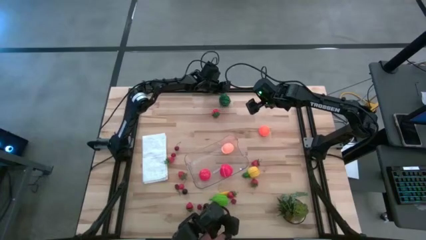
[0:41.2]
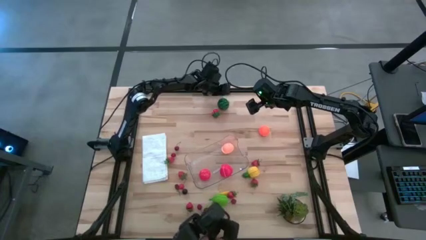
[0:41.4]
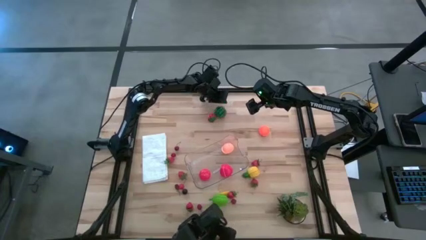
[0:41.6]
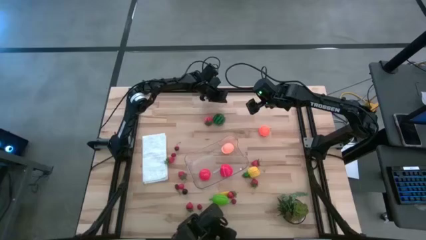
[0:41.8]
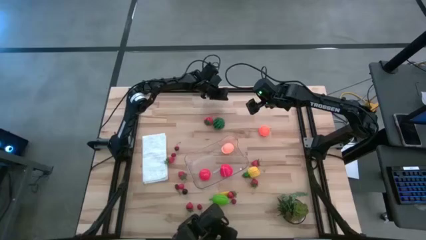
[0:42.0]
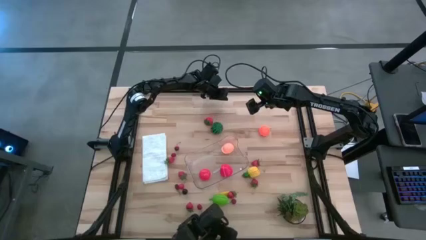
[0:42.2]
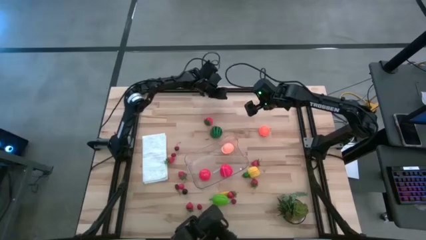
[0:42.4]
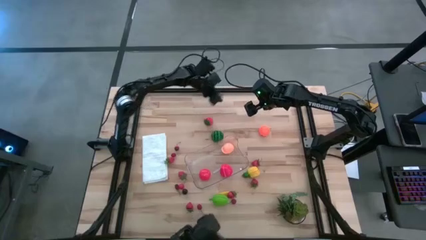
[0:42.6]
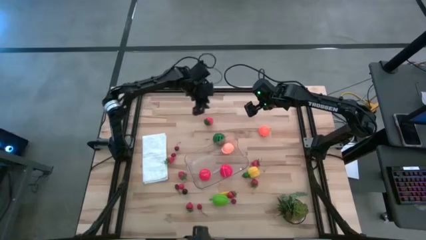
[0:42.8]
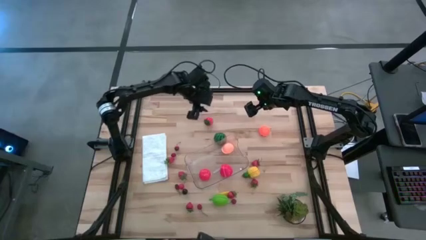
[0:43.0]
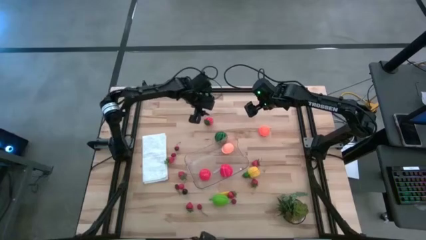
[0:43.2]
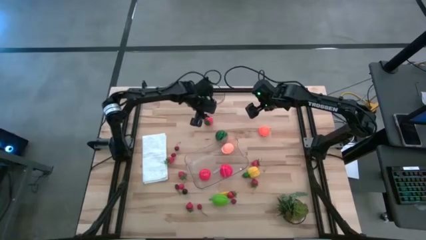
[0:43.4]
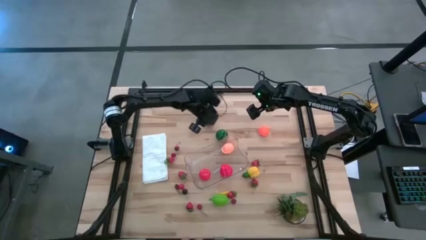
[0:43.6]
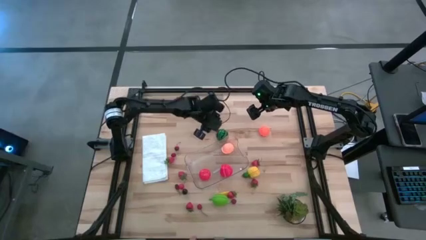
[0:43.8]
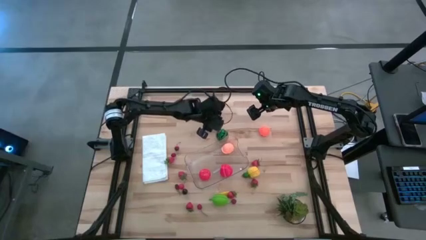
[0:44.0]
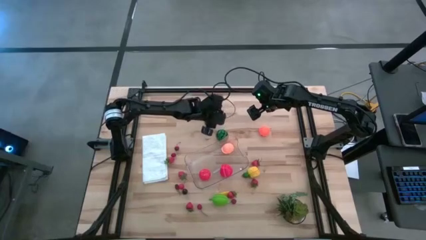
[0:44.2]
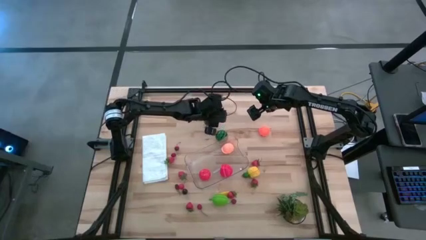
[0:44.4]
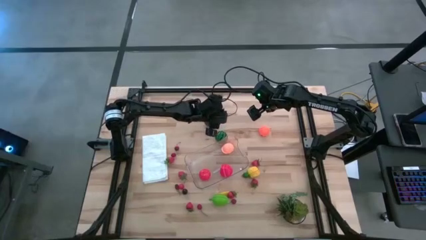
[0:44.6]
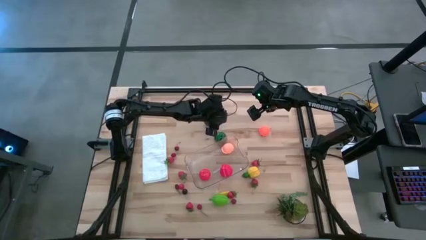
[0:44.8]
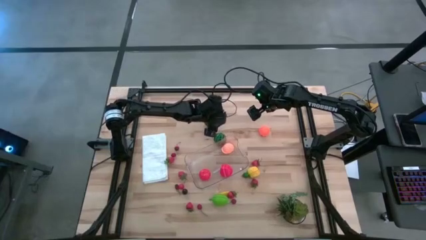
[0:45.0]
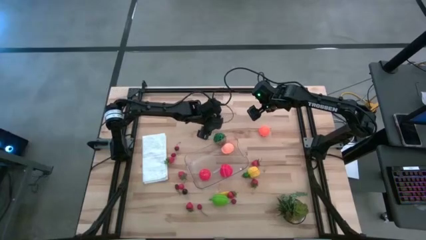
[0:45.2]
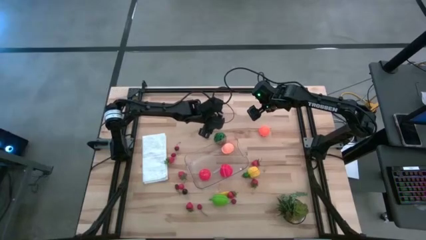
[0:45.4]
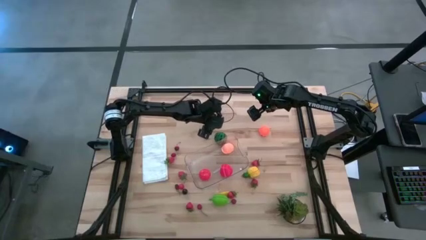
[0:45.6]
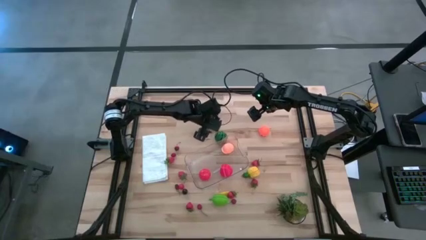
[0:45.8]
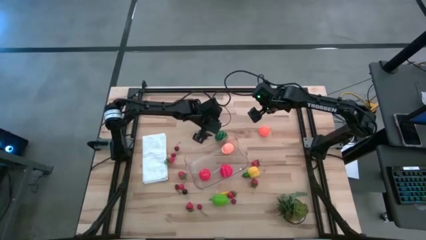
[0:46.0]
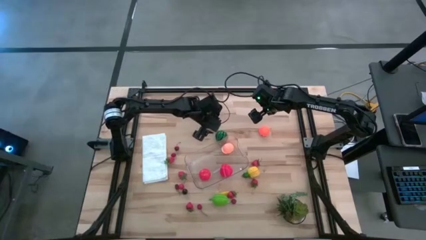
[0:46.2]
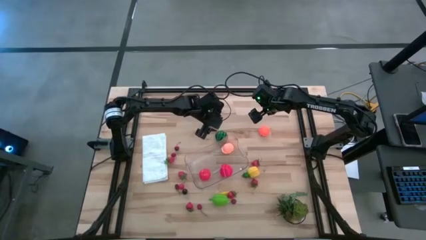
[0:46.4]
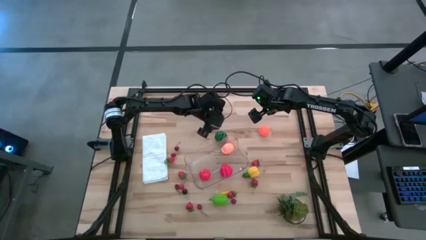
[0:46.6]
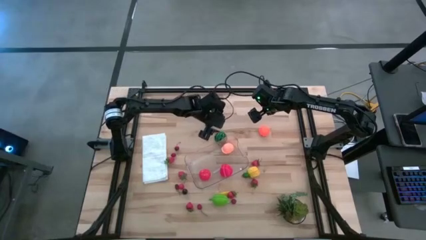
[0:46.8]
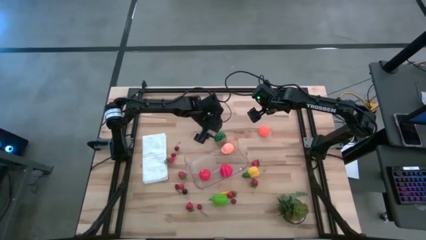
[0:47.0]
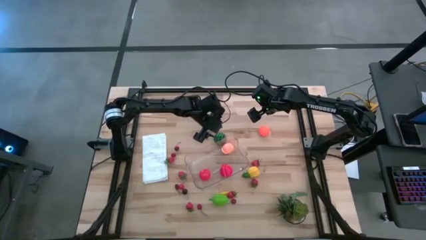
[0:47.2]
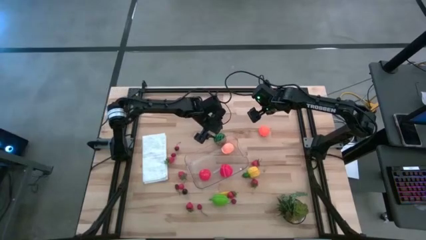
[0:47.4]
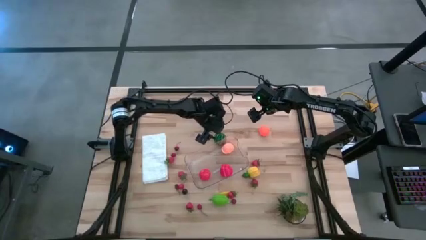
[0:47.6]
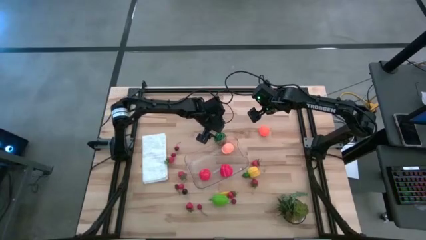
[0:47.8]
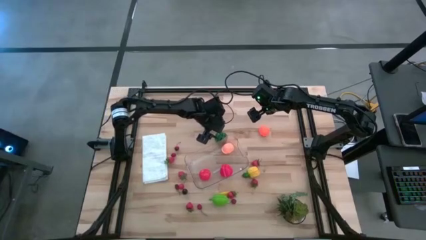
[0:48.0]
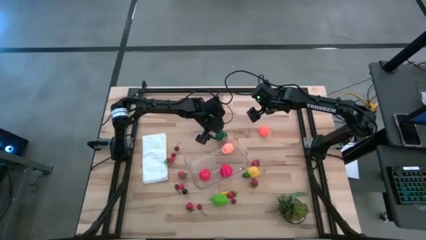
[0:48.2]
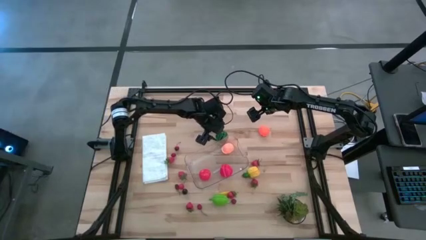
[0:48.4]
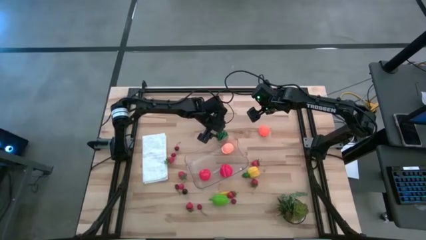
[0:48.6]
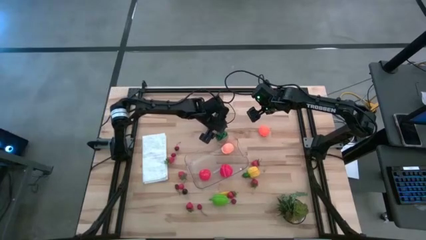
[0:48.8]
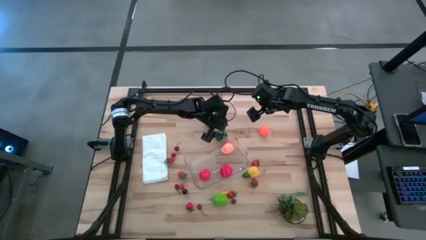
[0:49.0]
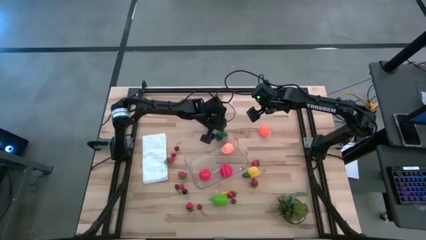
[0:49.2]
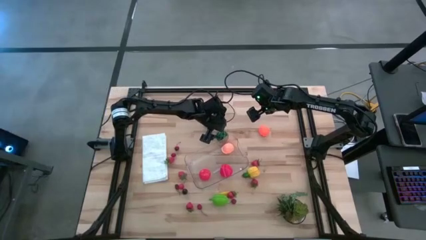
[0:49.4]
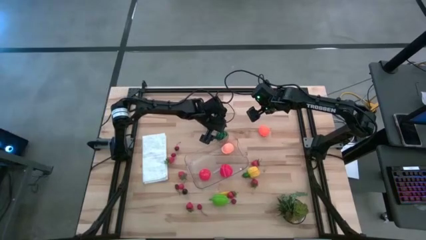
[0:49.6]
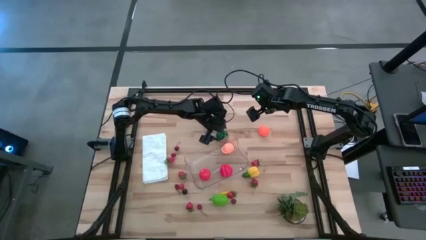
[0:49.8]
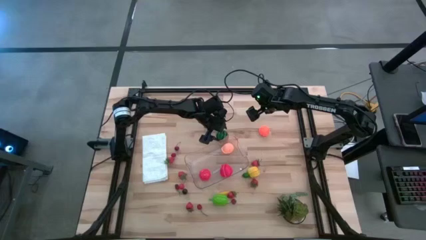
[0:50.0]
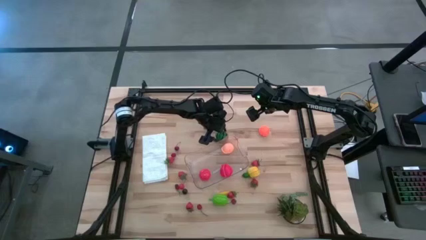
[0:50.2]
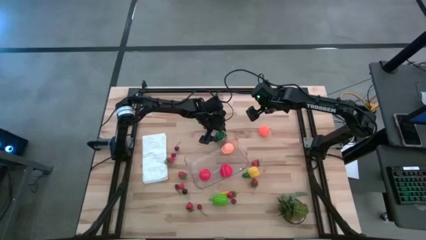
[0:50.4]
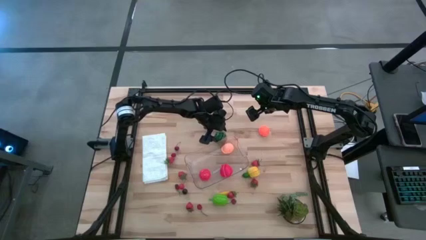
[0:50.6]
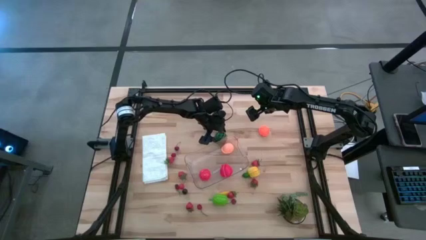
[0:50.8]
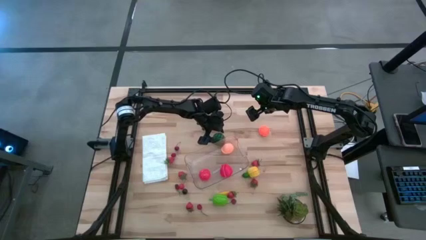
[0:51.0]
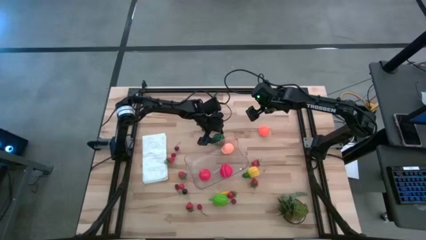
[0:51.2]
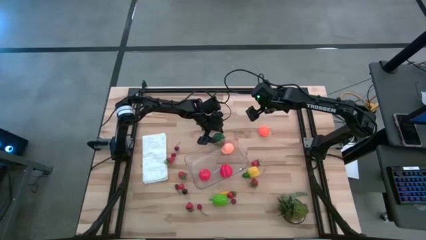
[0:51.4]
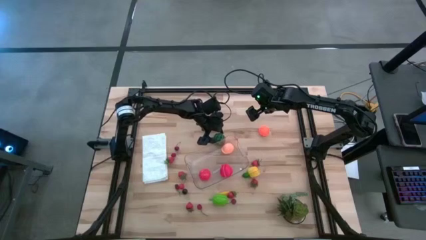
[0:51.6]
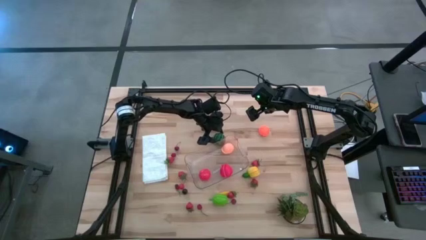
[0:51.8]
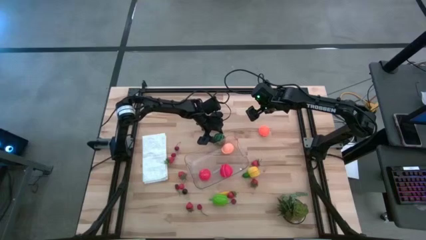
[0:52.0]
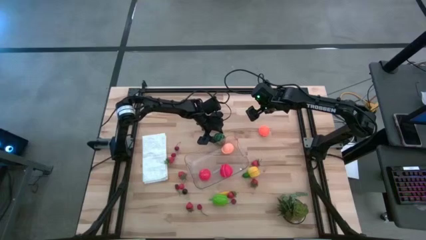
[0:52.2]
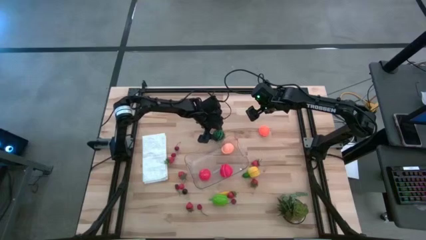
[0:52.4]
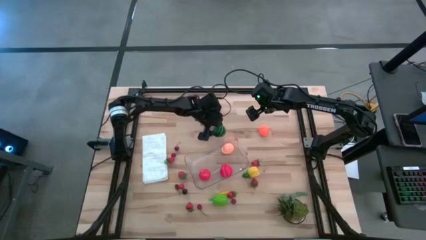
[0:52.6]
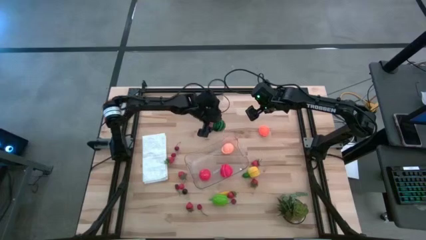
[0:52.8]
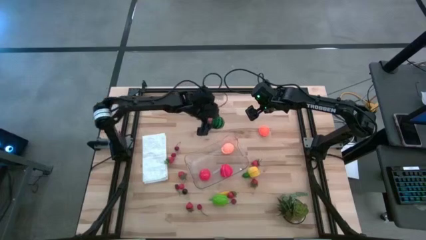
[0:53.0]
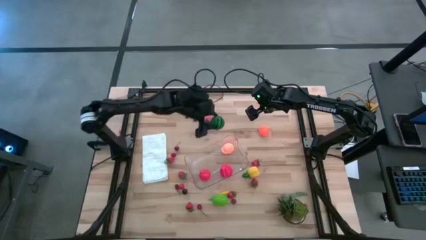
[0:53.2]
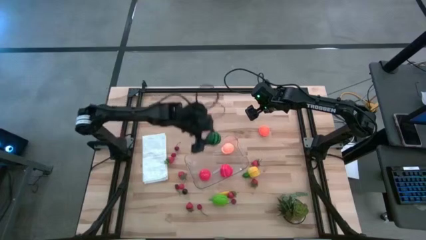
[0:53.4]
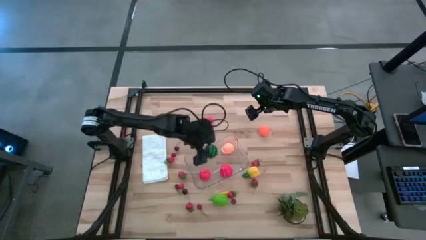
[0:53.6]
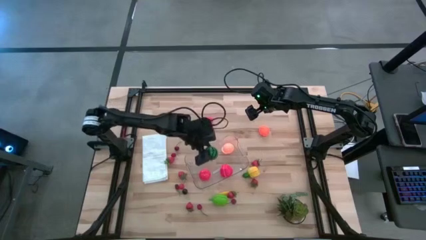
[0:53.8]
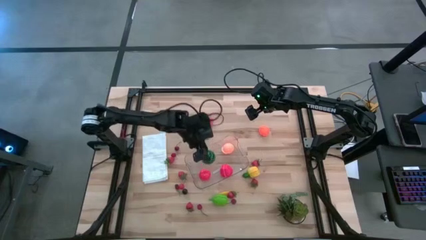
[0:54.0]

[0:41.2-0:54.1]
Task: Pick and placing Produce into tupperware
Put the watermelon into the transparent bin

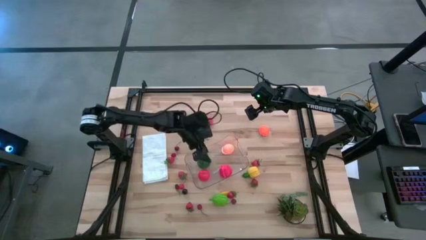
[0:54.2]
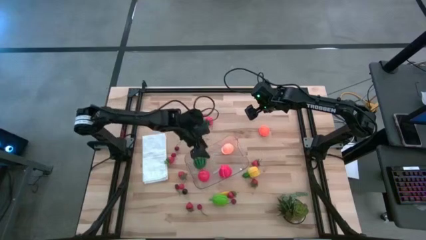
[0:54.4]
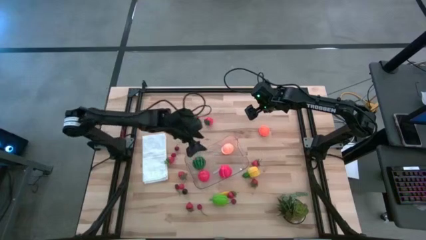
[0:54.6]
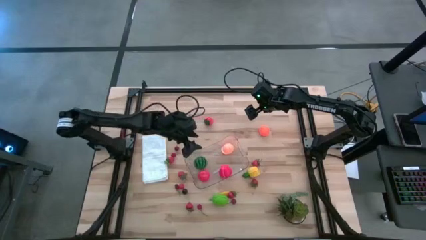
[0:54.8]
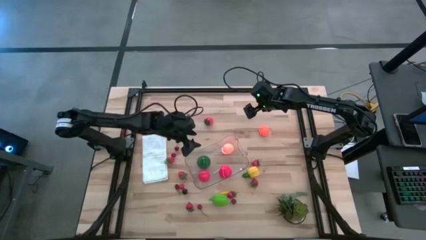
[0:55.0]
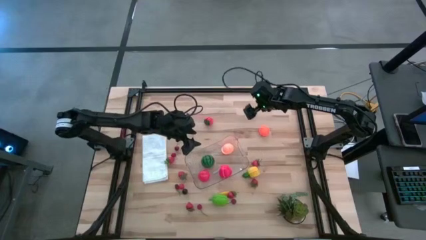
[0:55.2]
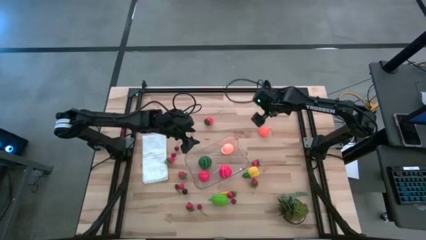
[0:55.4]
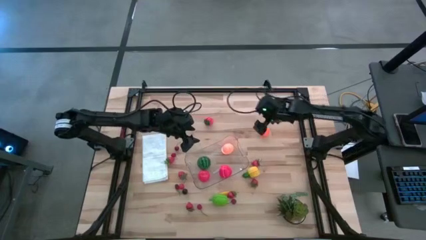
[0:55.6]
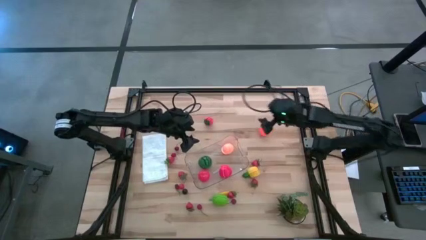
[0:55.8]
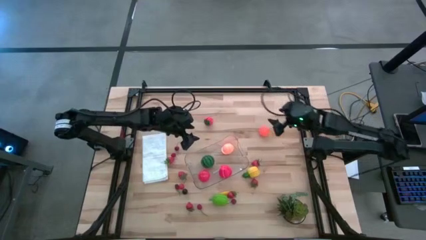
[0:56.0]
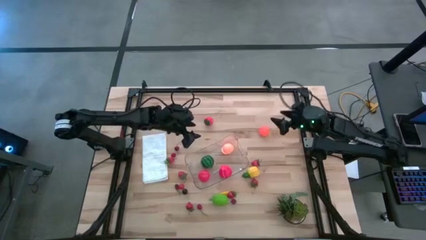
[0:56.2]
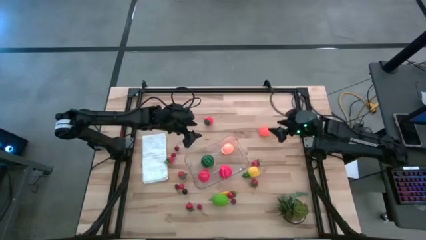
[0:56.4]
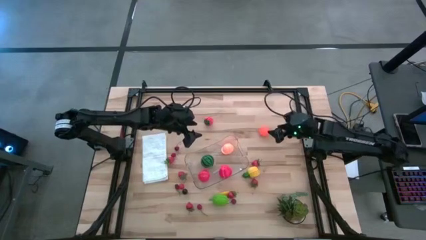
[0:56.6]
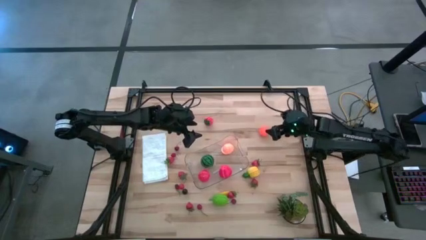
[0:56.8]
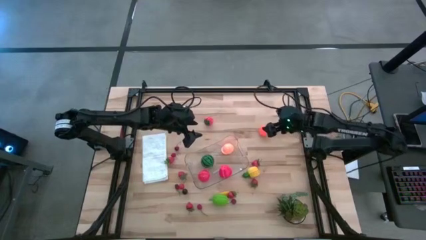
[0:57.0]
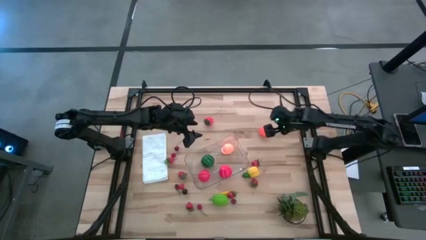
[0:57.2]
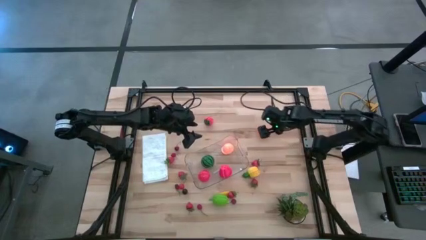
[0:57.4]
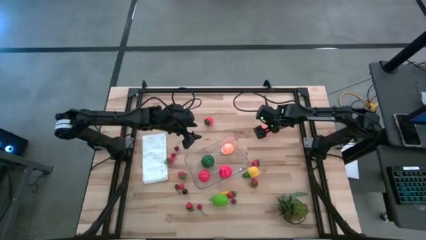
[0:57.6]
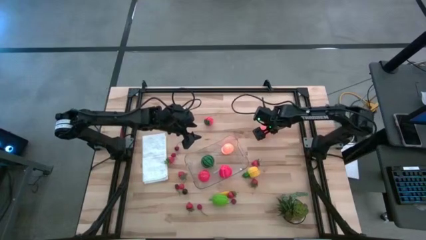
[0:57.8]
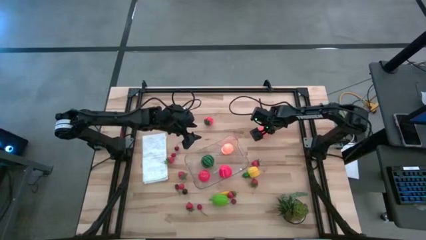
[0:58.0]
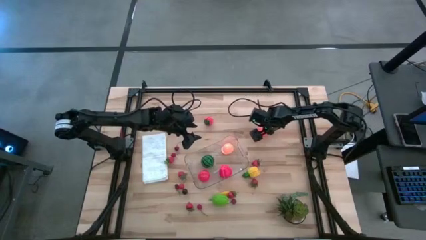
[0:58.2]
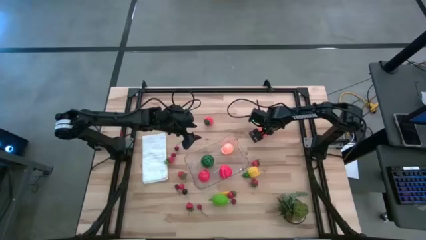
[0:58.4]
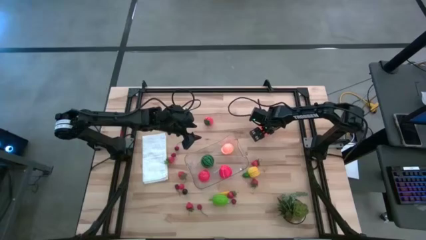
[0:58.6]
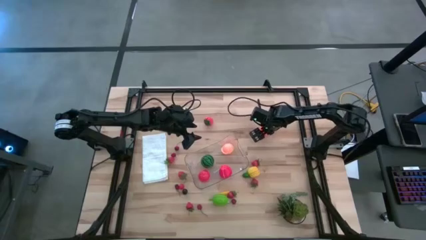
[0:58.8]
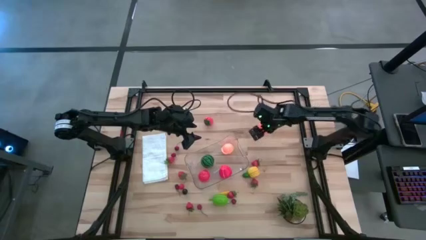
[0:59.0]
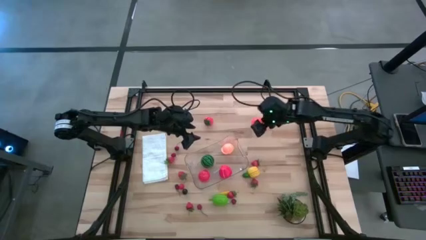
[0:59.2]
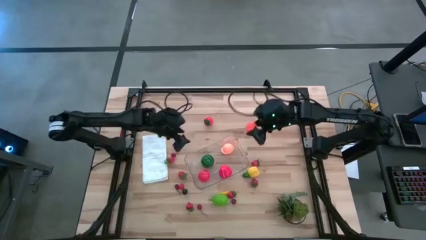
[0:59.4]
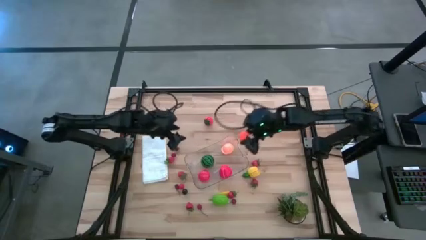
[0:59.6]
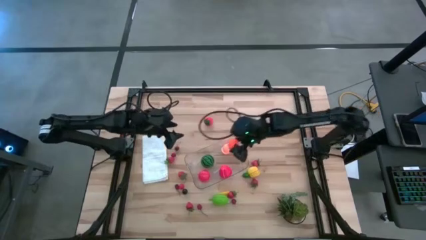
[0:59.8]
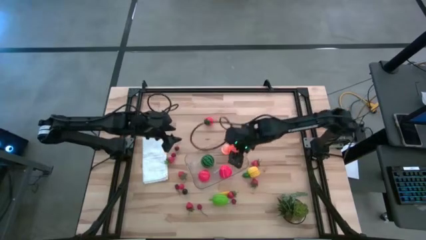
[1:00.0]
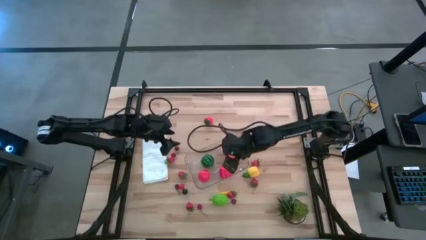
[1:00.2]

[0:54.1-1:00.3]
Put the tangerine into the transparent bin
